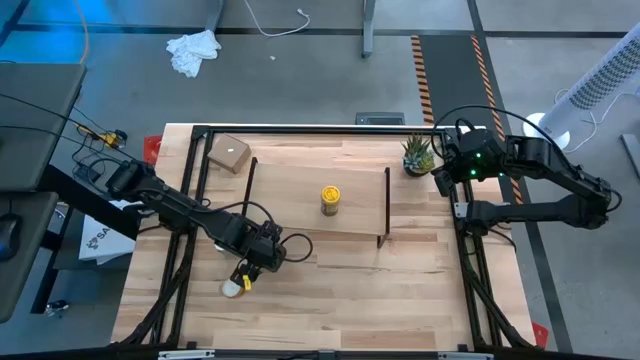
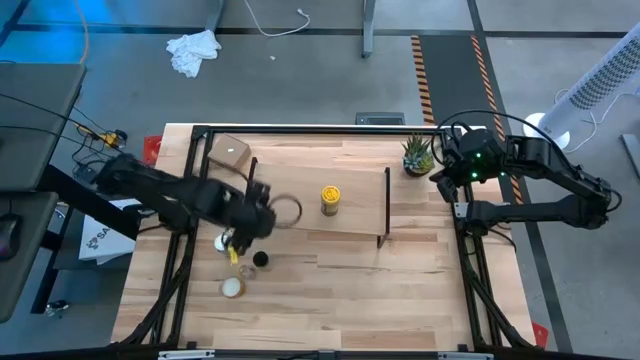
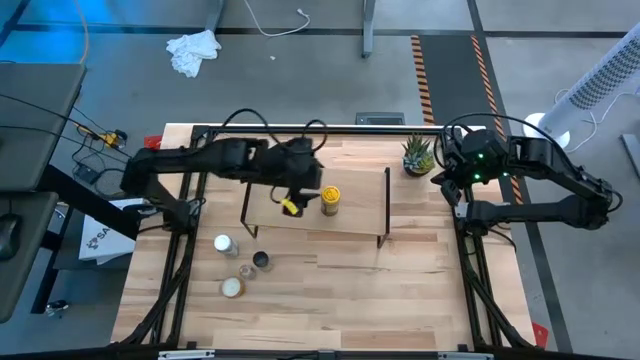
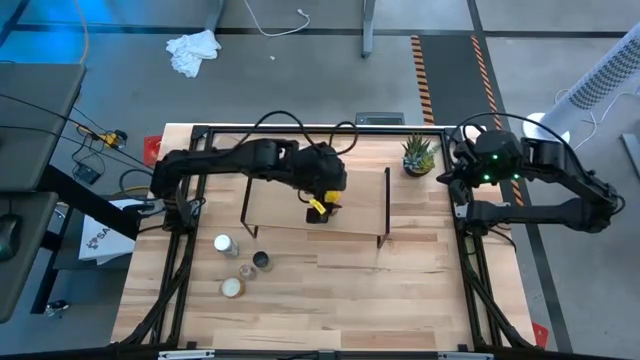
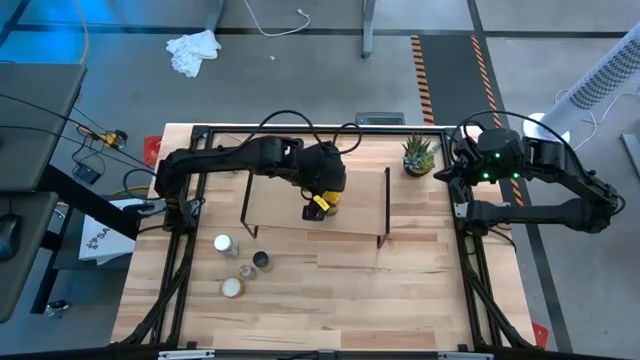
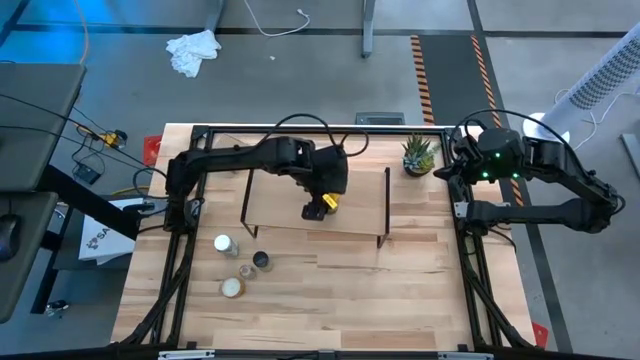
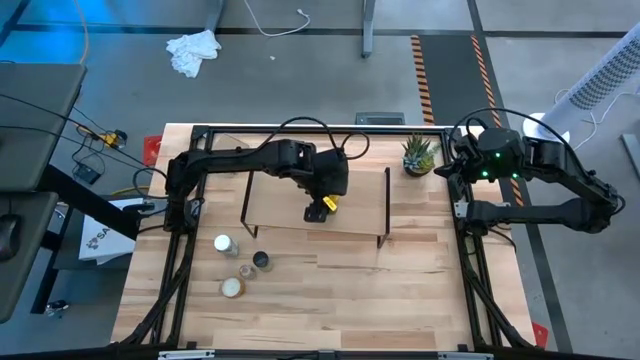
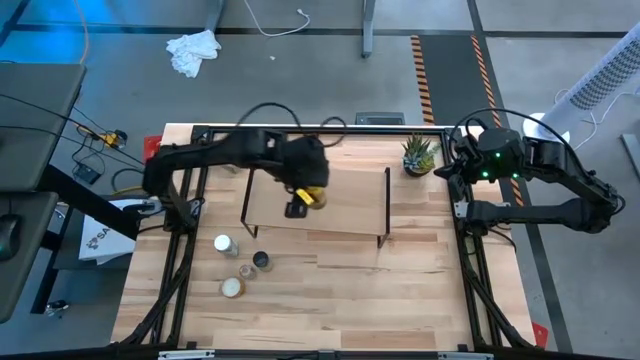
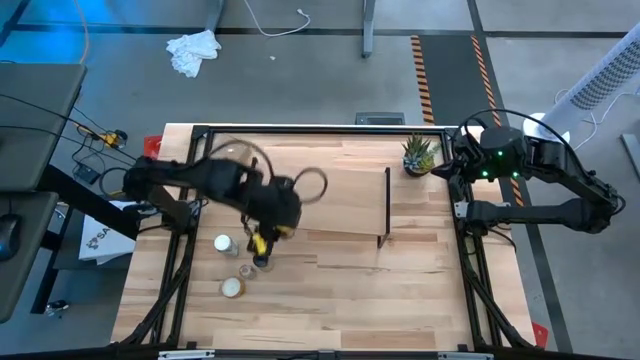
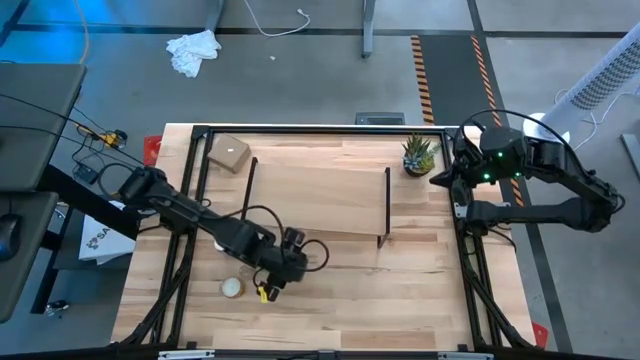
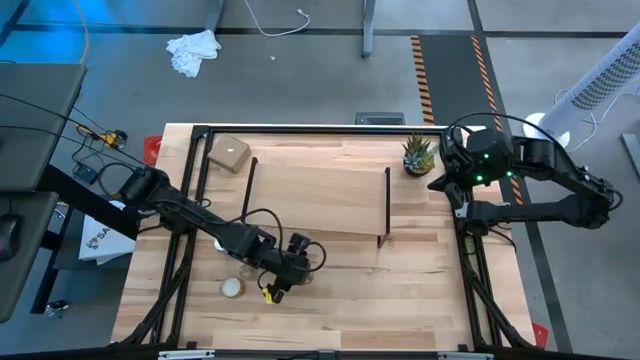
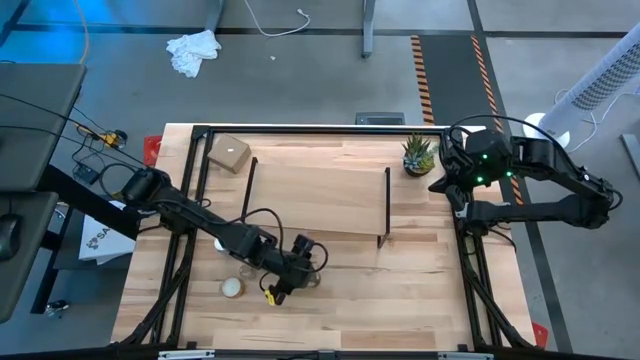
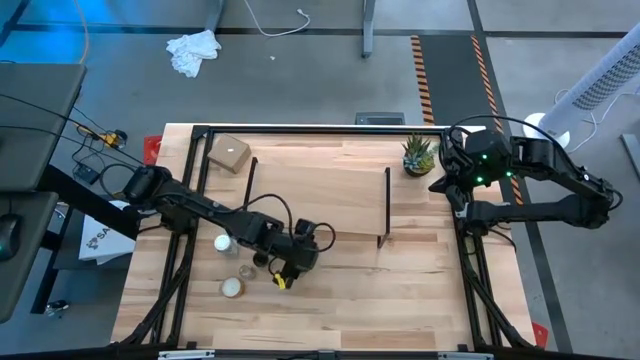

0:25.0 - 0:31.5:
Task: Shelf spices
Remove the yellow seasoning bottle from the shelf

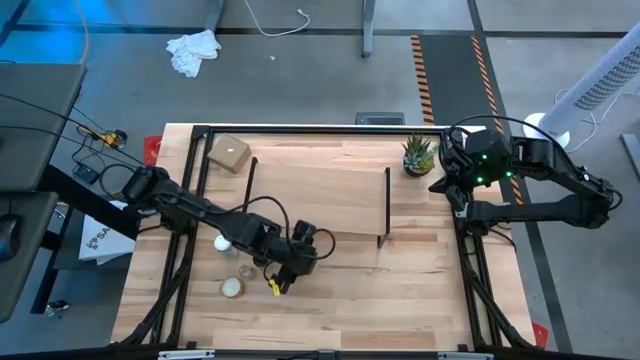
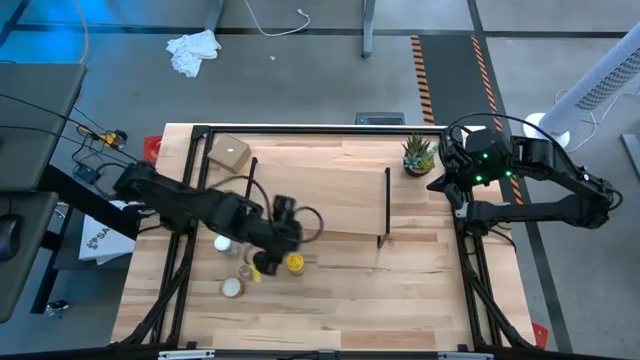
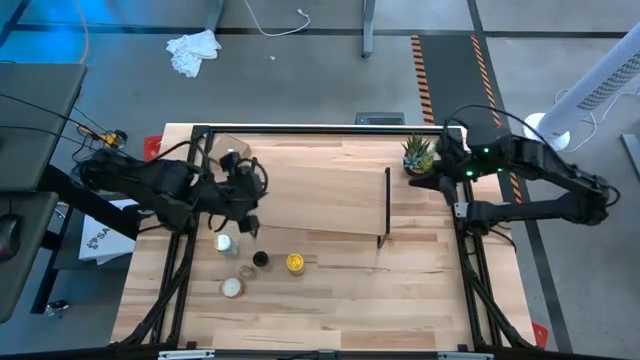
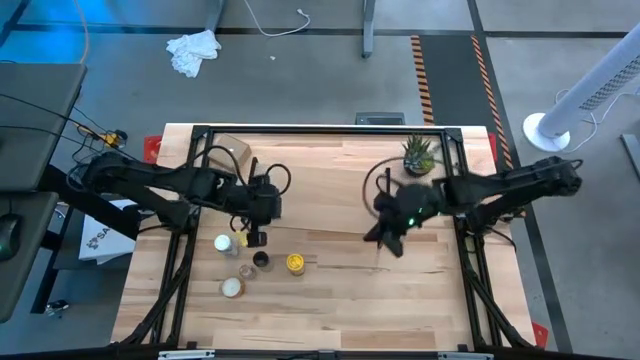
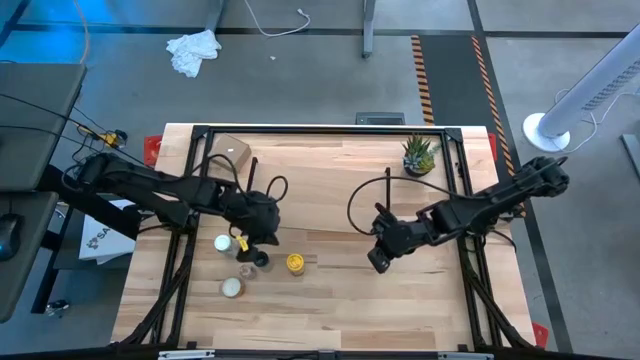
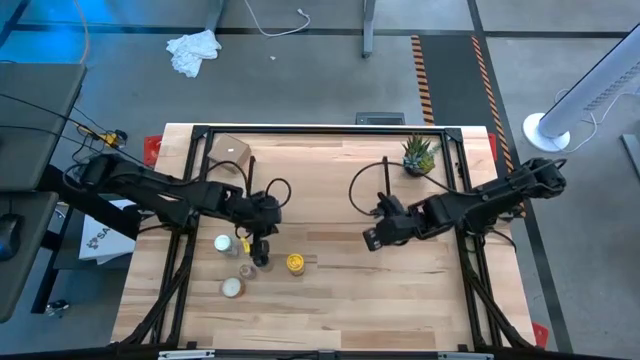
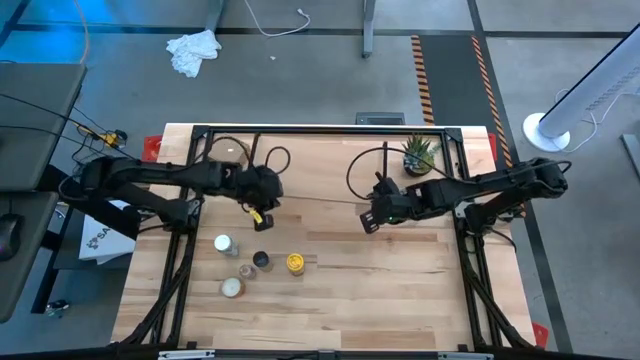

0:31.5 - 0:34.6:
Adjust the shelf

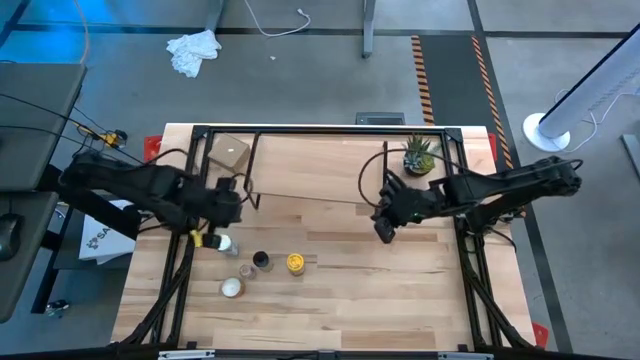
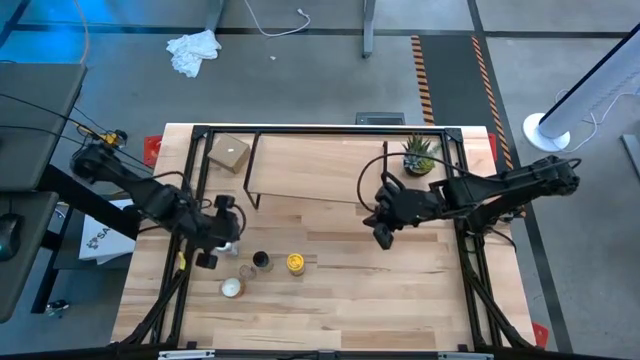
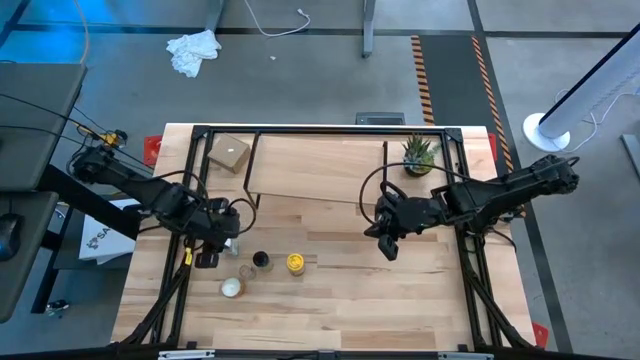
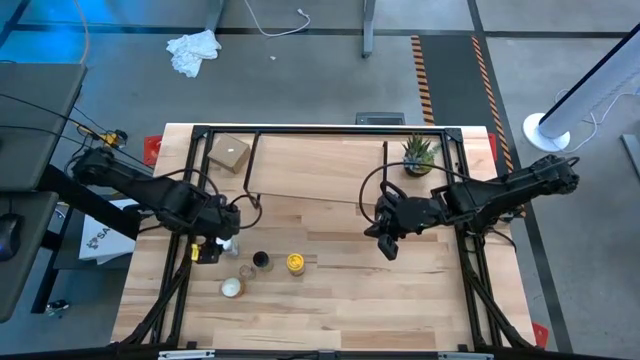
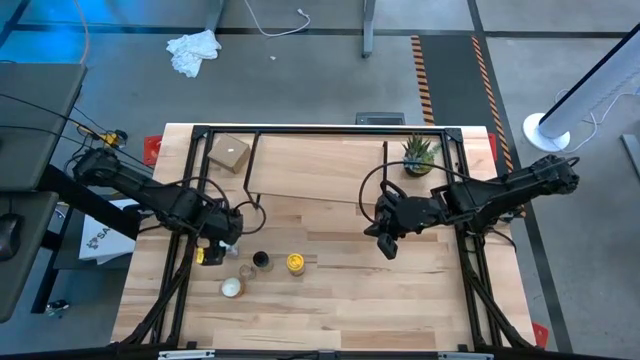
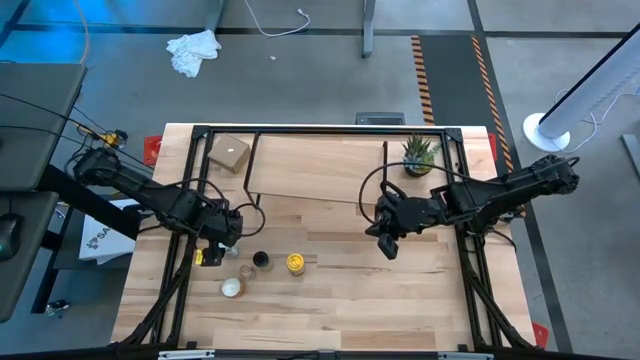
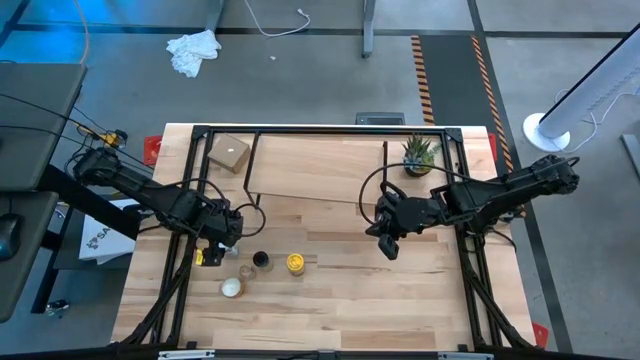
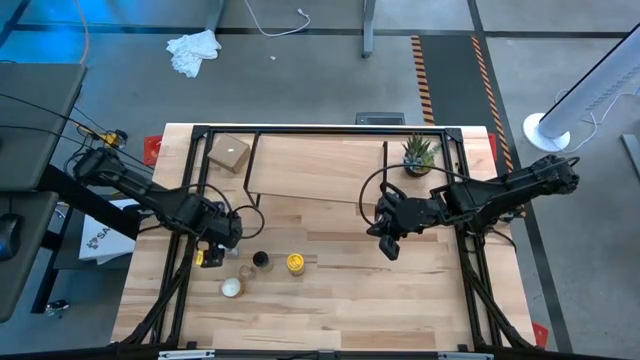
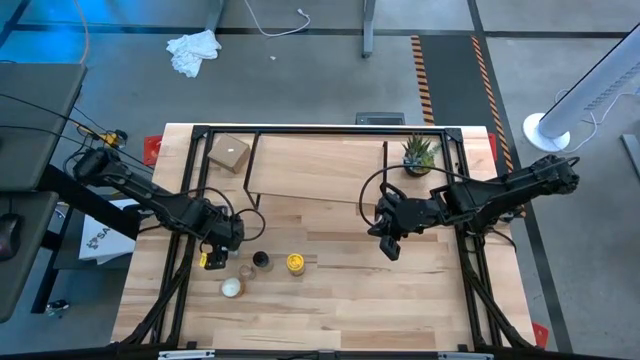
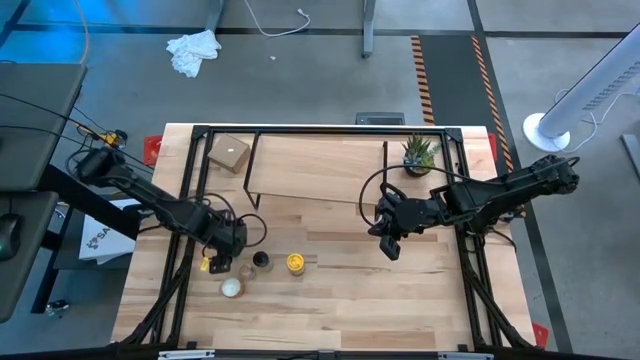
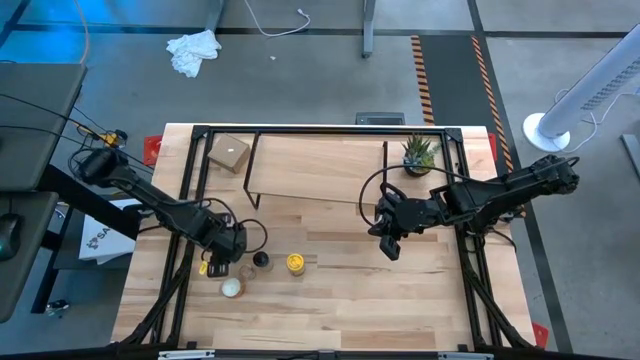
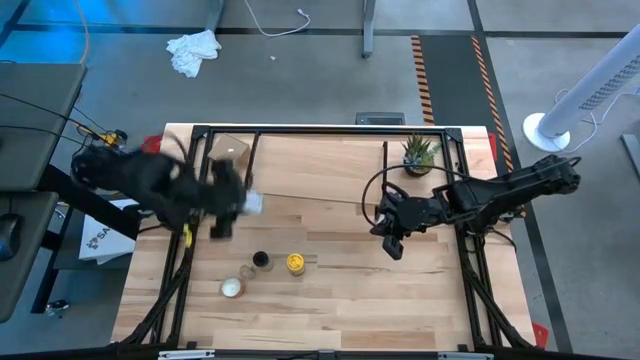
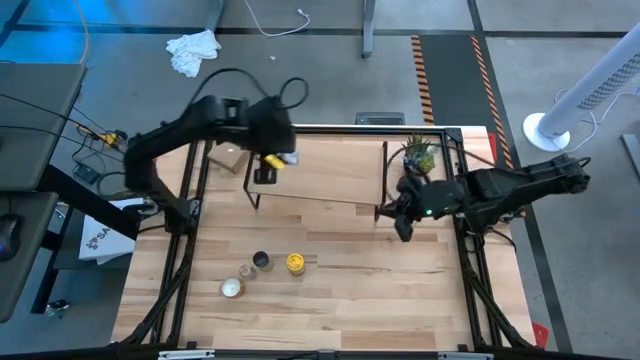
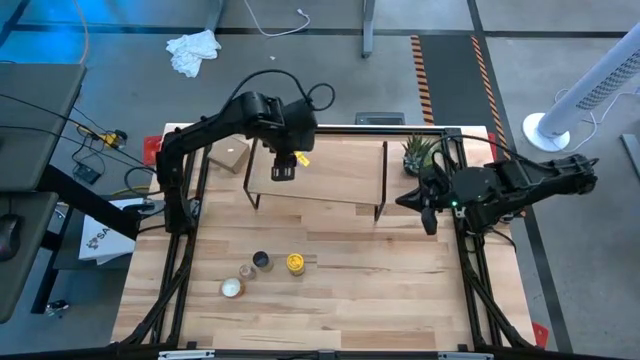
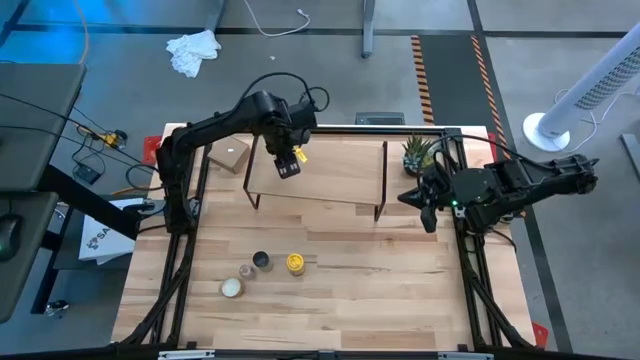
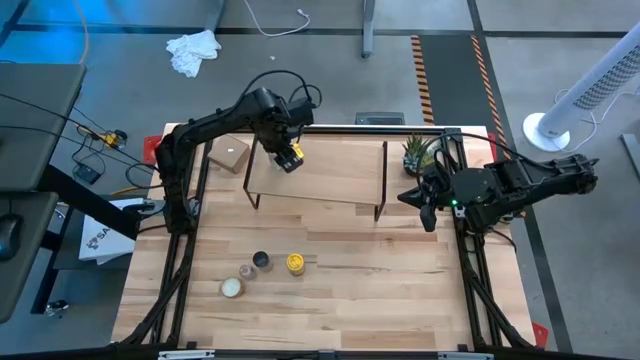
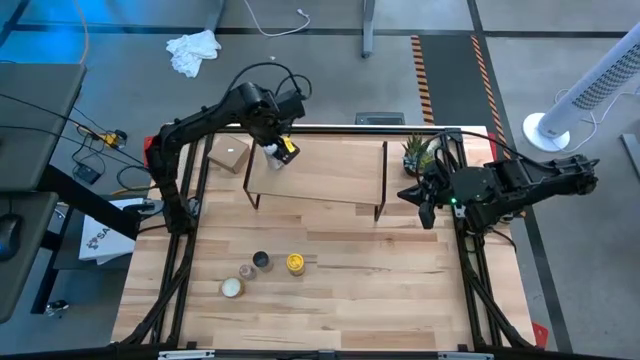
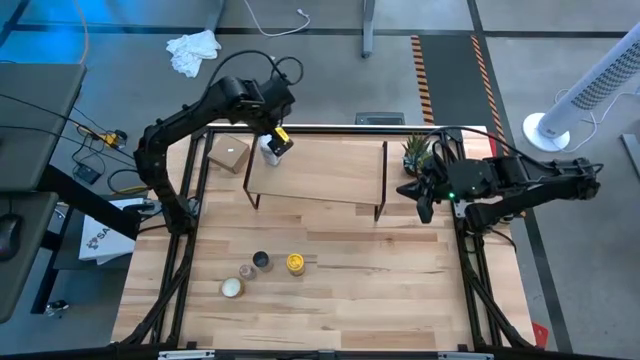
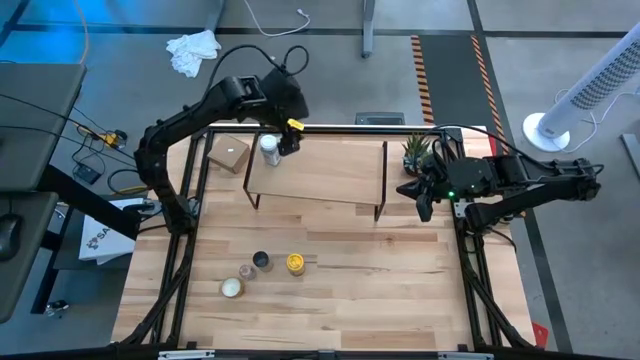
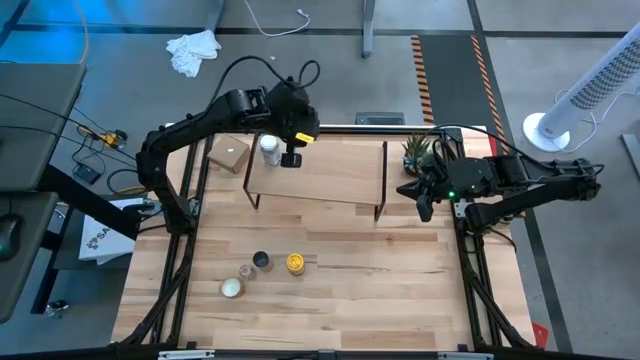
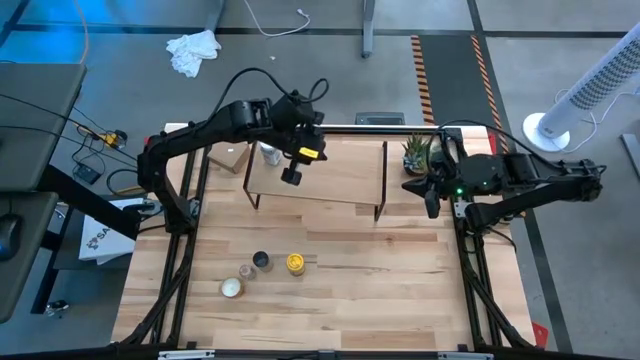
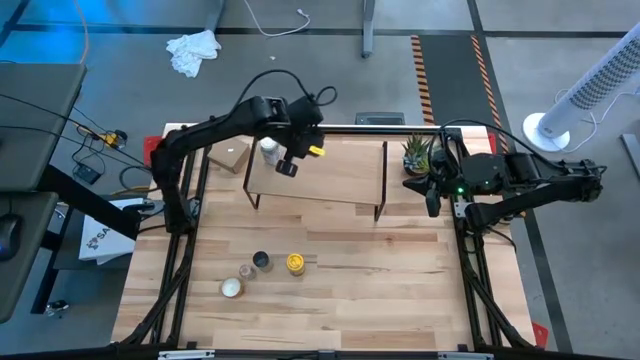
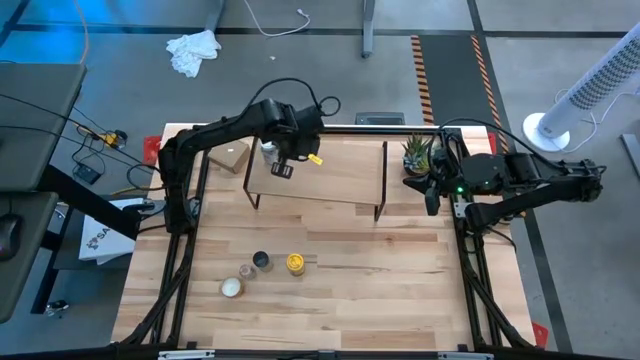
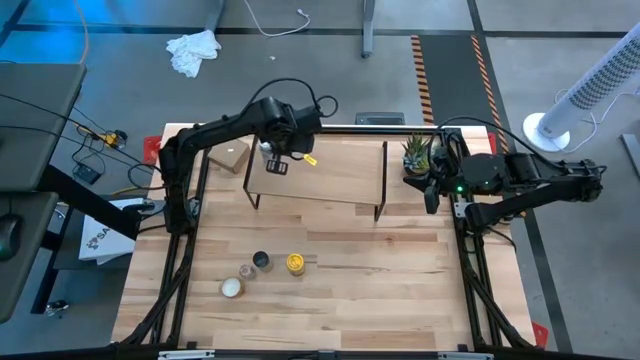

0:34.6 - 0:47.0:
Put the white seasoning bottle on the shelf
